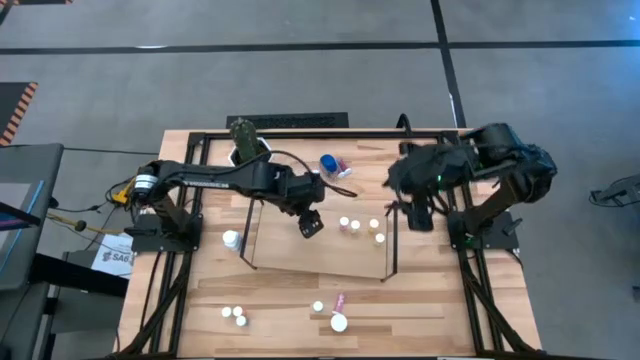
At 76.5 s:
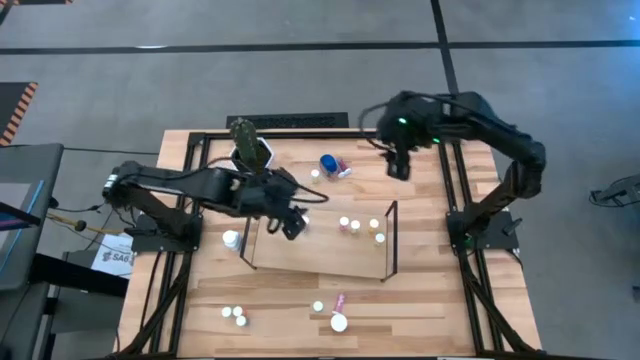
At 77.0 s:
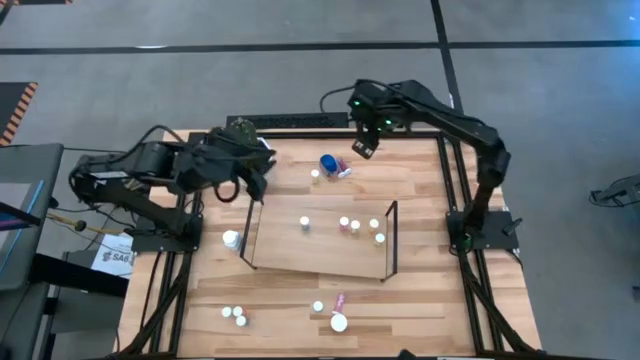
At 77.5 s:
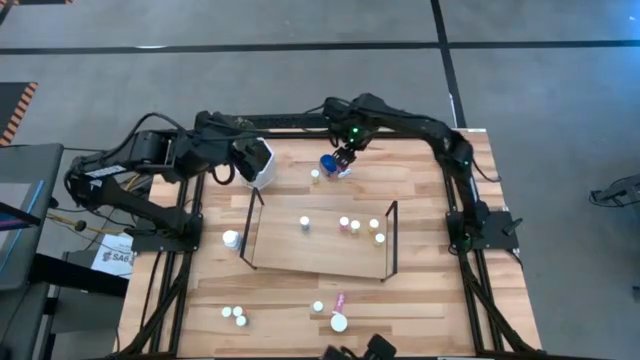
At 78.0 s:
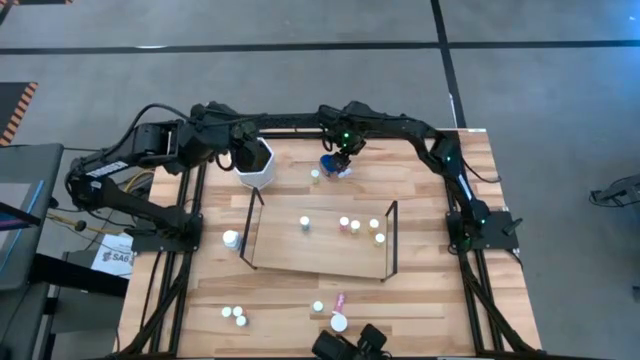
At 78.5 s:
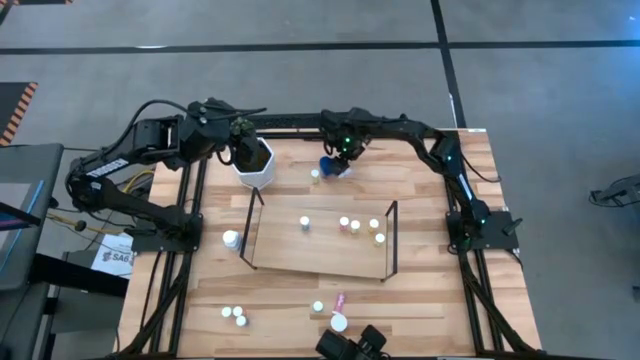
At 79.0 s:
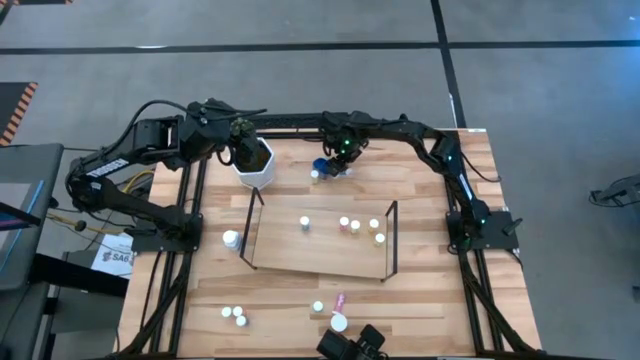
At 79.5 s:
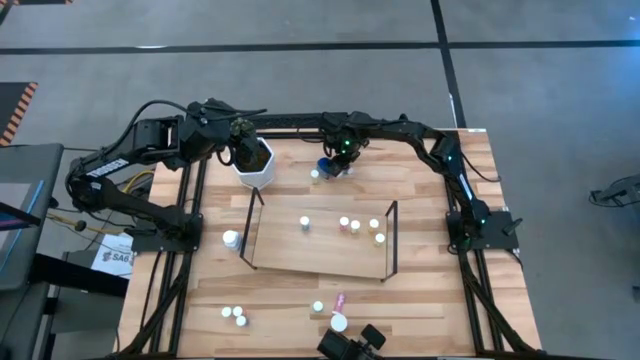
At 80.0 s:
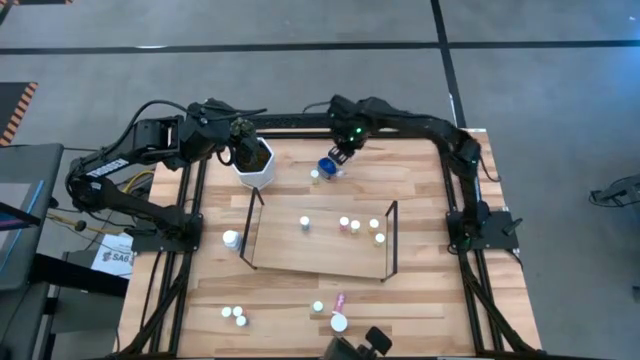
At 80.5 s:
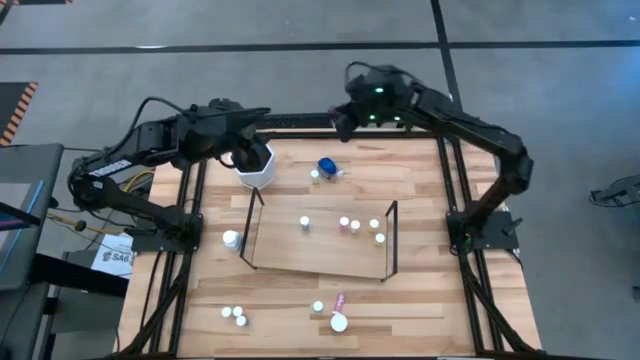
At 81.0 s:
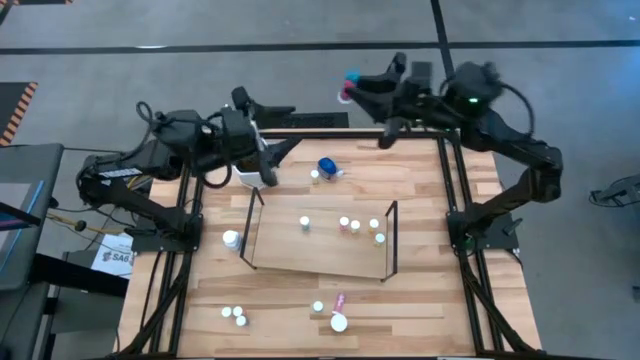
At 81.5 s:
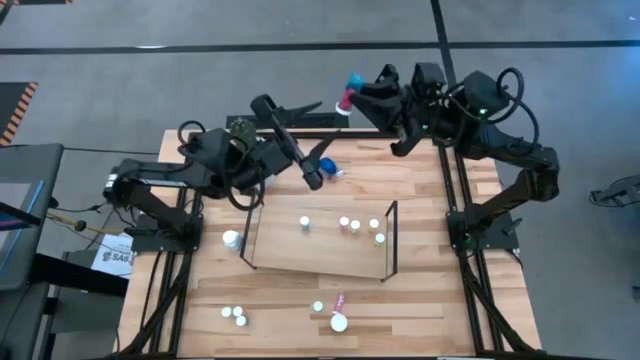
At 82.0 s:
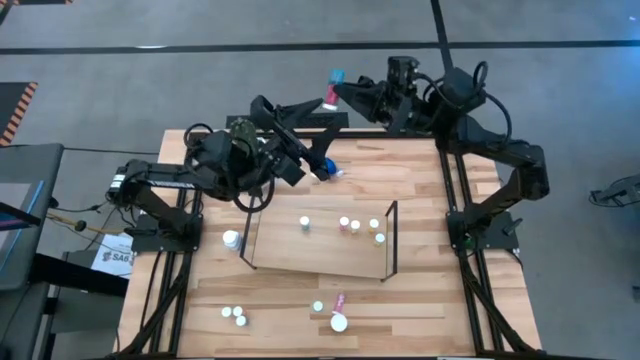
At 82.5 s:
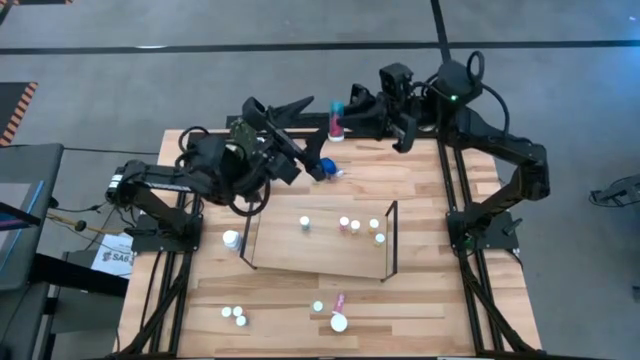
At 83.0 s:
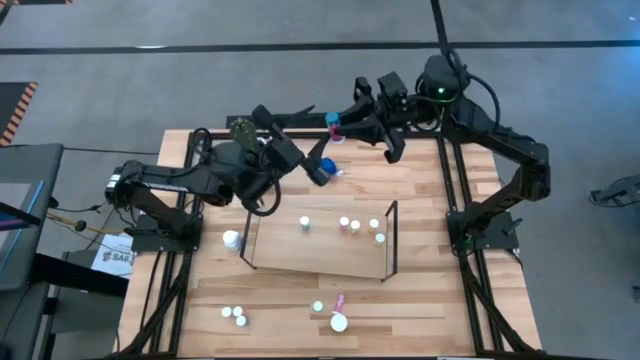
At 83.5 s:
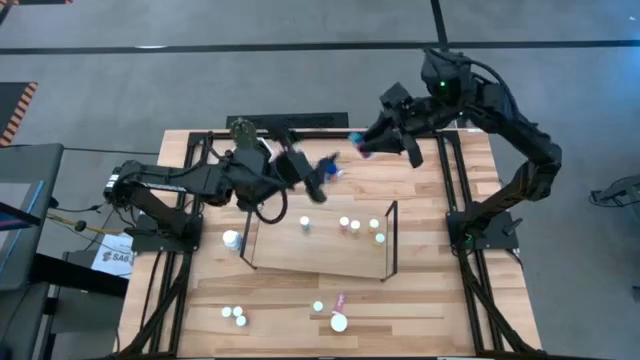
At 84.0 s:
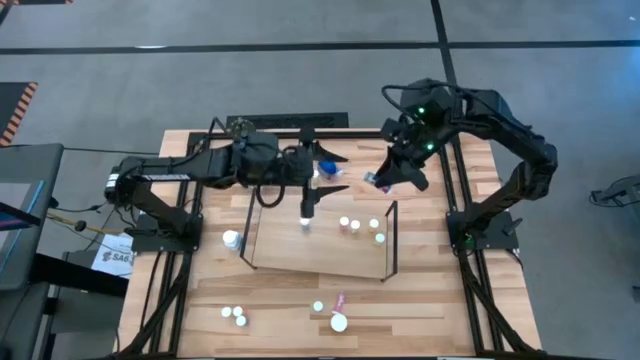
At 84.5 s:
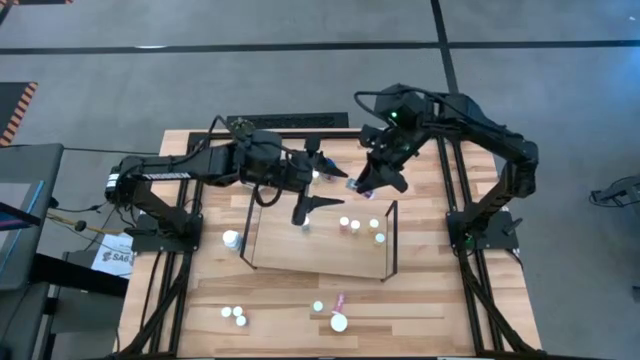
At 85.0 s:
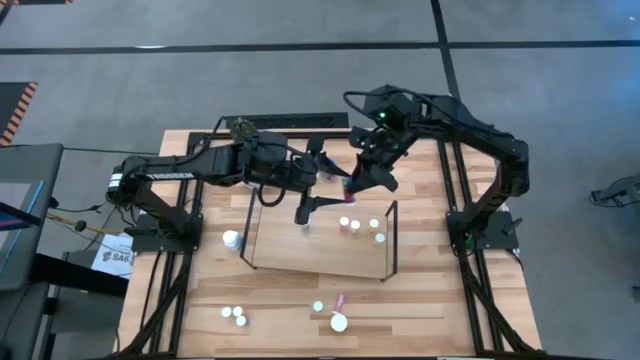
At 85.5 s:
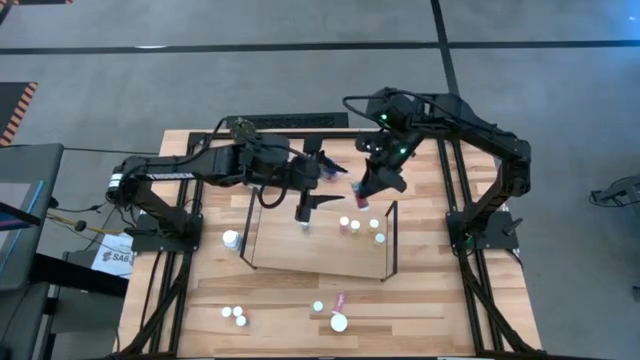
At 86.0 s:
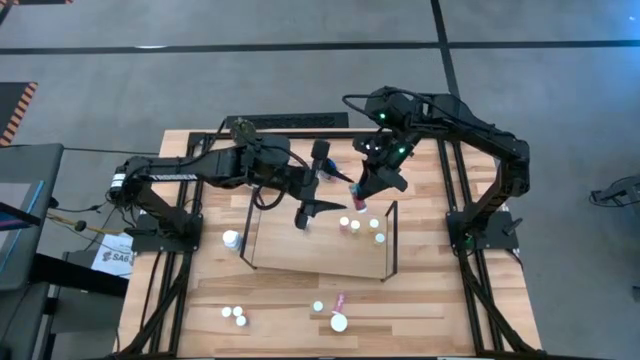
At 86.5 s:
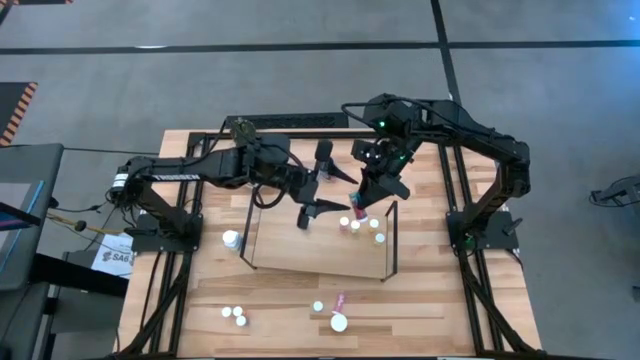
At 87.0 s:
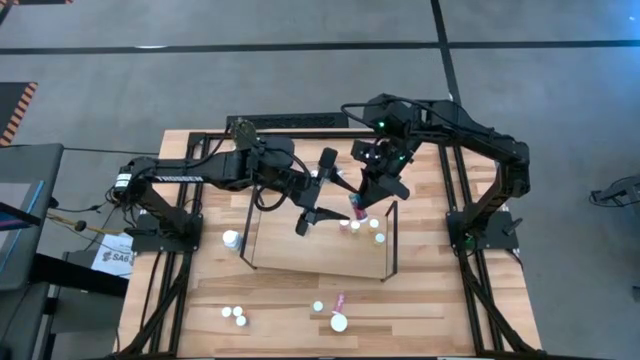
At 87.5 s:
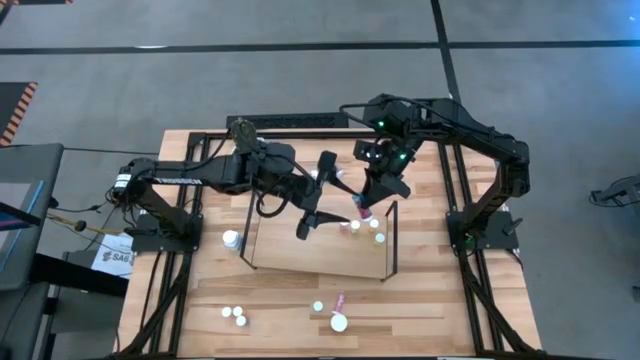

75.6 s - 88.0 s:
Task: Pick and place medicine bottles onto shelf by color
Put the blue pill bottle on the shelf

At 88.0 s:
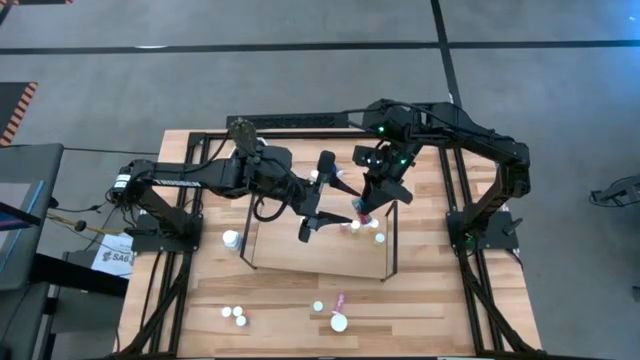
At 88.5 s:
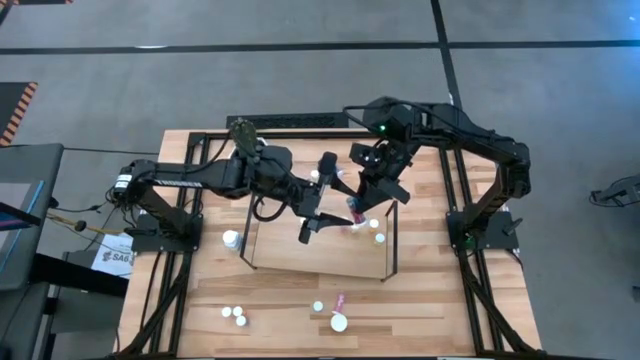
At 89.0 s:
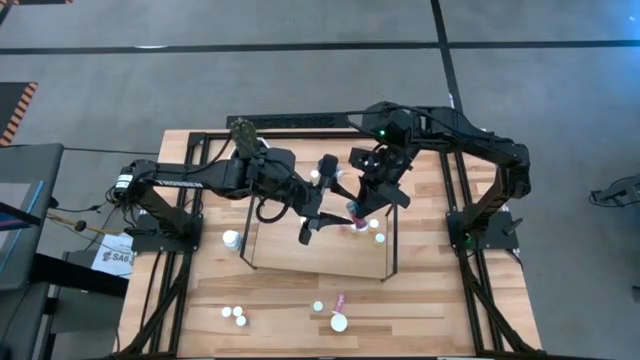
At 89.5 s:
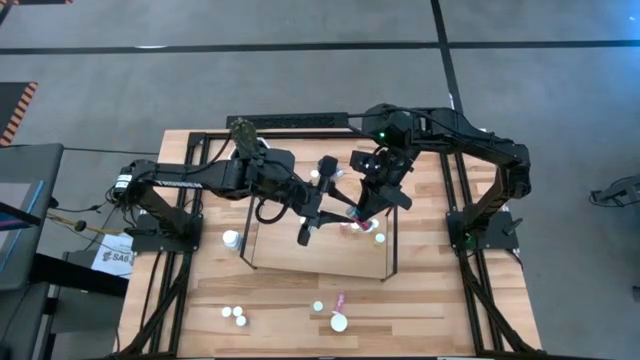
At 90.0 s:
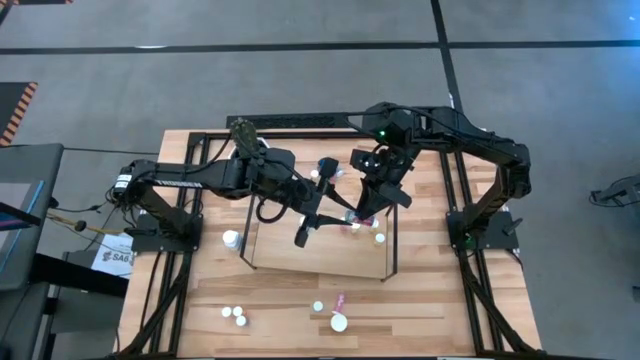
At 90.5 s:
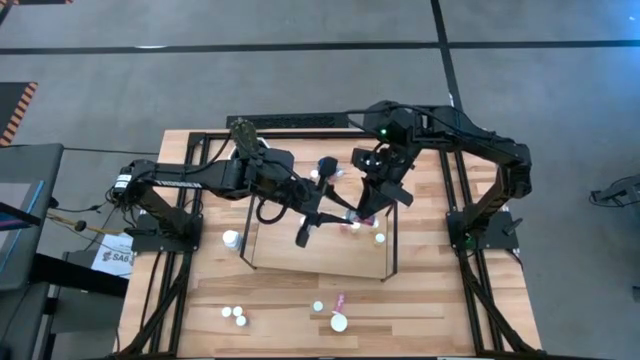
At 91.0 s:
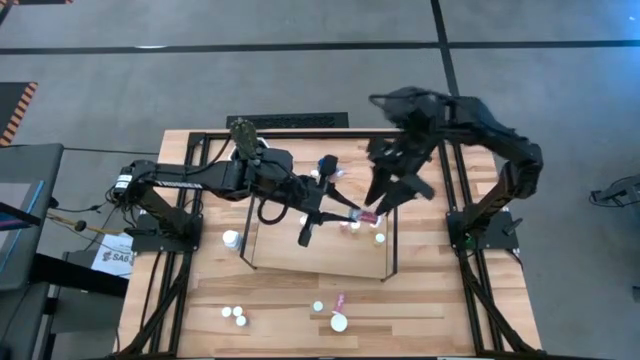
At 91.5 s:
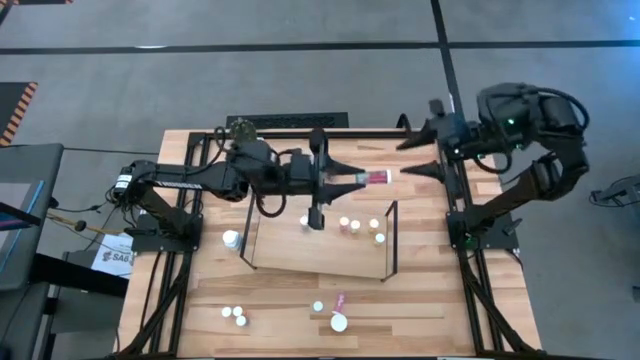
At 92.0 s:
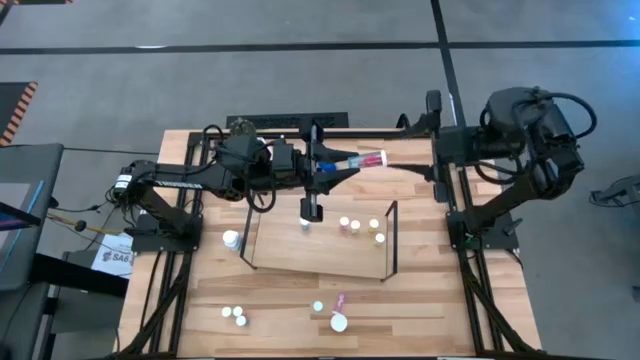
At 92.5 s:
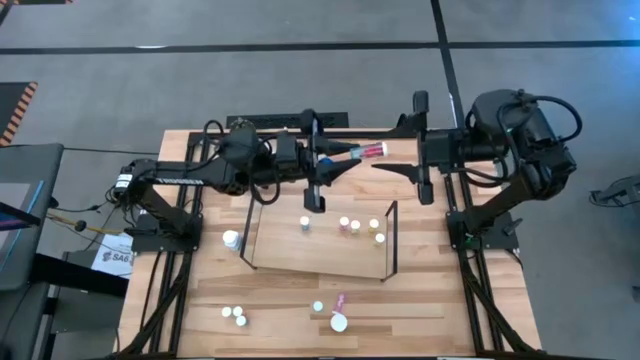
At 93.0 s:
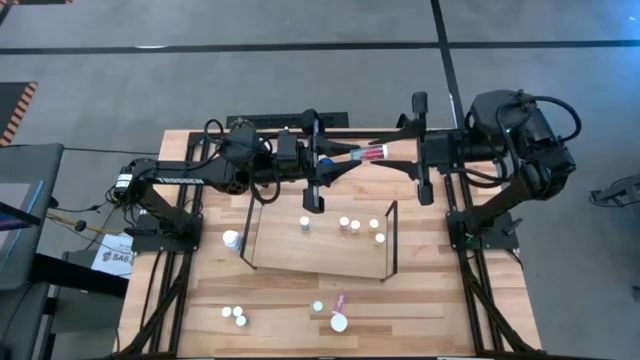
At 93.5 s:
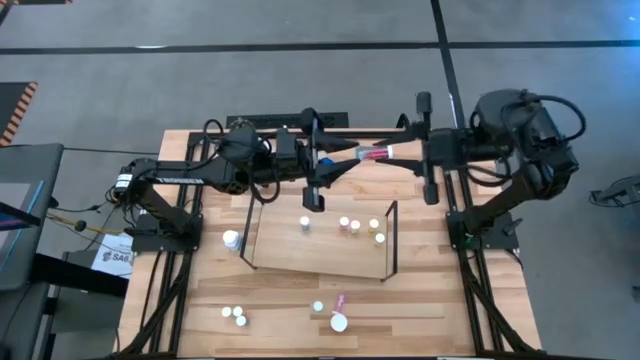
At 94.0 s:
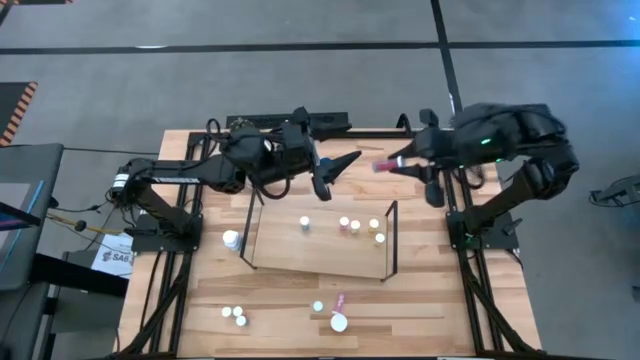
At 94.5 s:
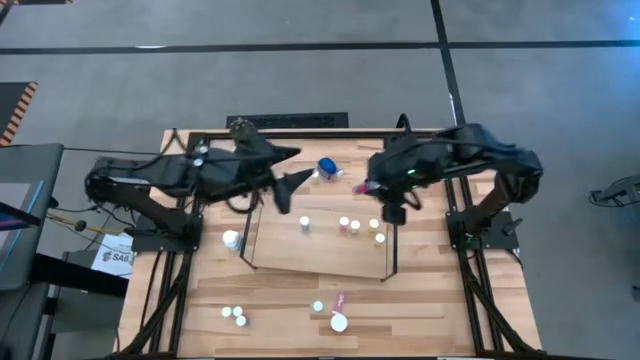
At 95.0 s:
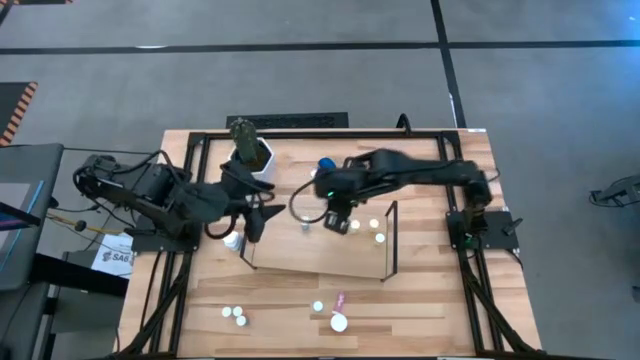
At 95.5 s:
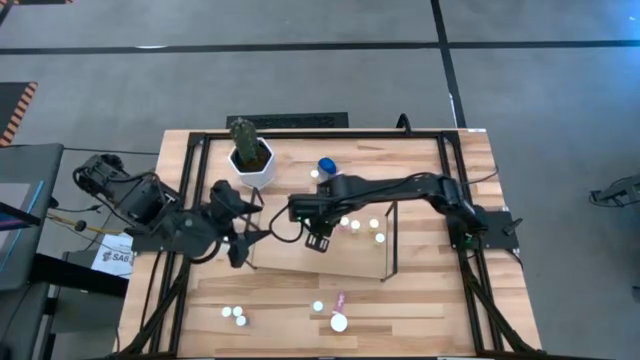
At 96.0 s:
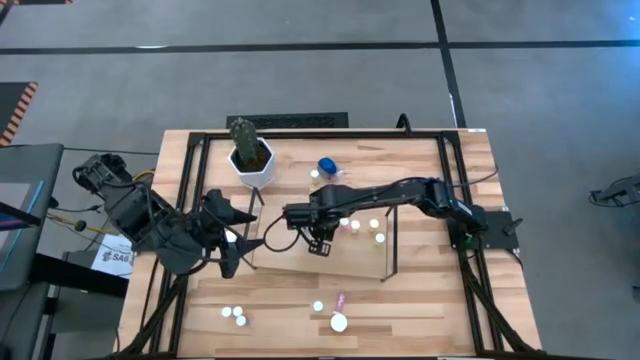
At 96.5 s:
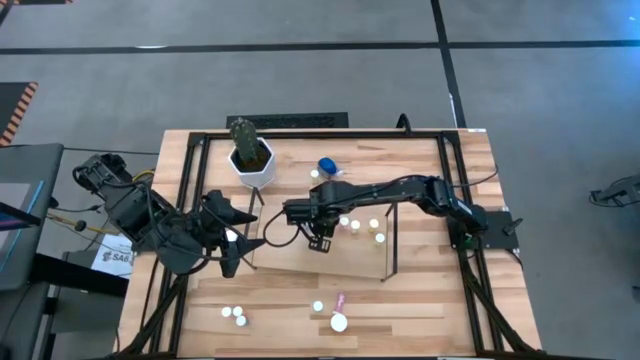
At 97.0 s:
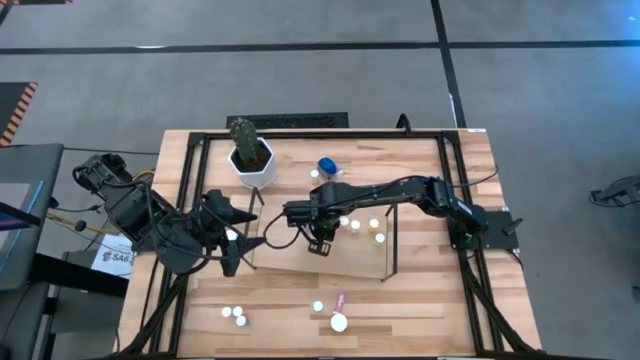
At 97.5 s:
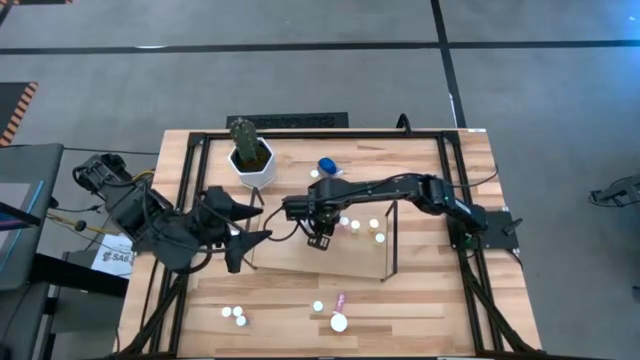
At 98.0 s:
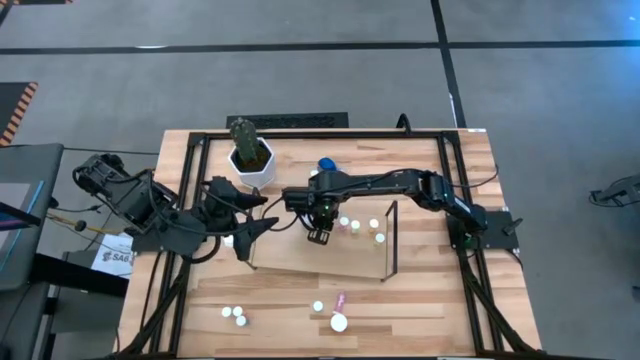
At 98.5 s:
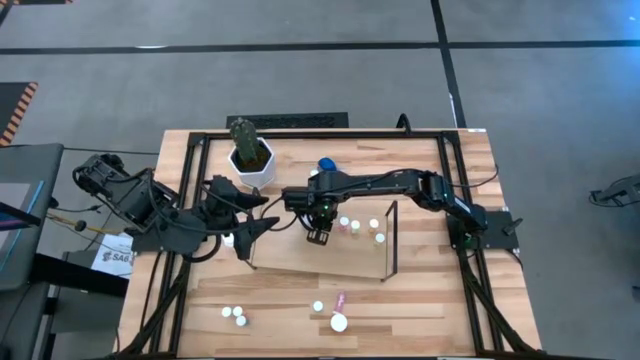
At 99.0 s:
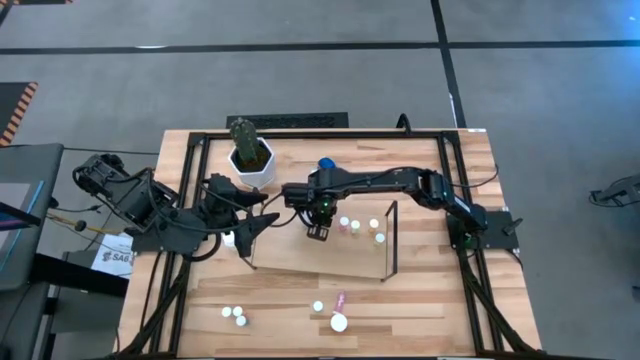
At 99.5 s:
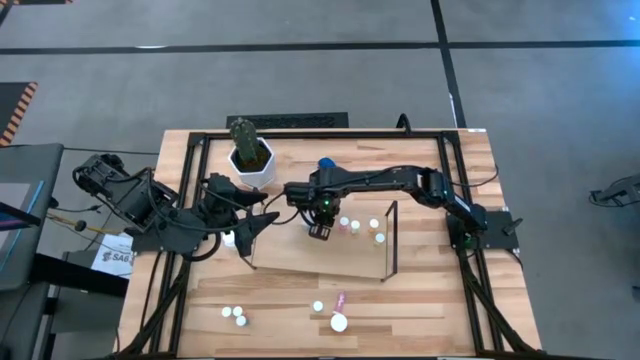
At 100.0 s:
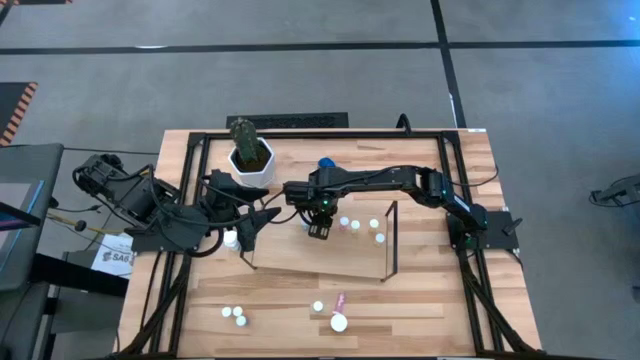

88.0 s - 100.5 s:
Put the blue pill bottle on the shelf
